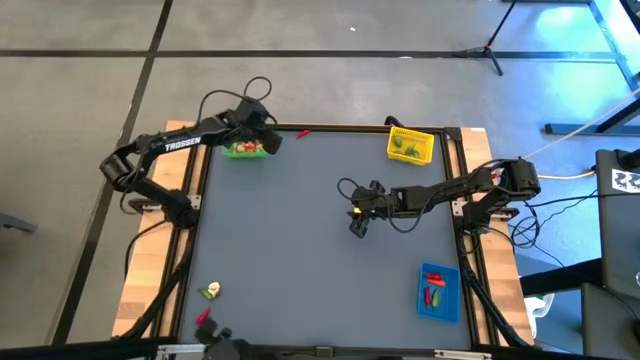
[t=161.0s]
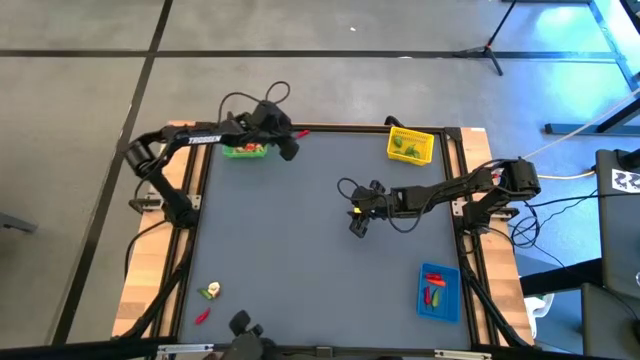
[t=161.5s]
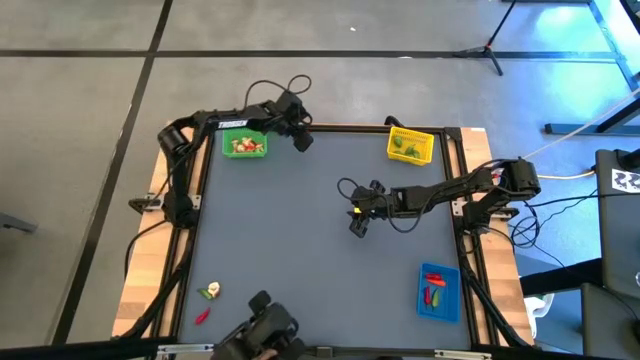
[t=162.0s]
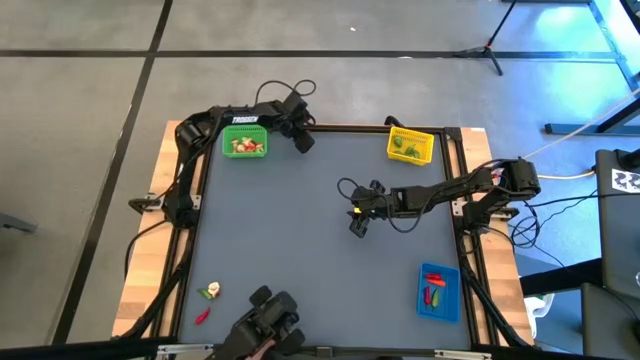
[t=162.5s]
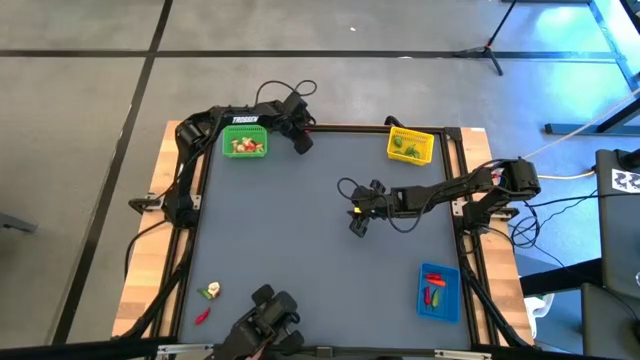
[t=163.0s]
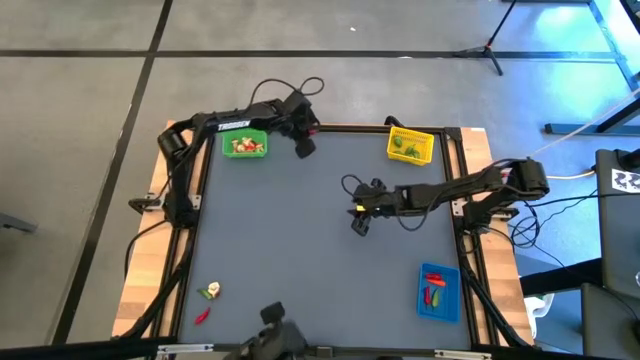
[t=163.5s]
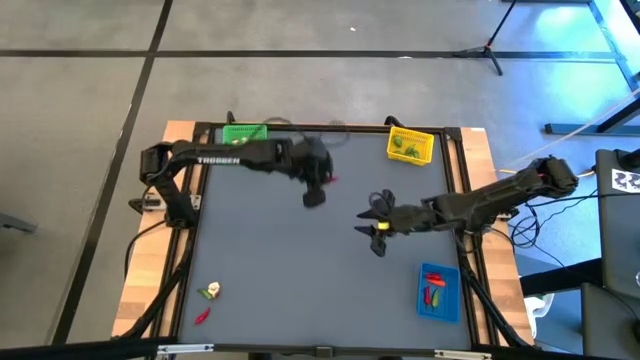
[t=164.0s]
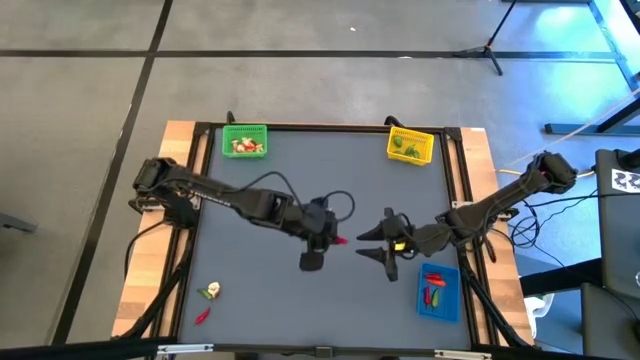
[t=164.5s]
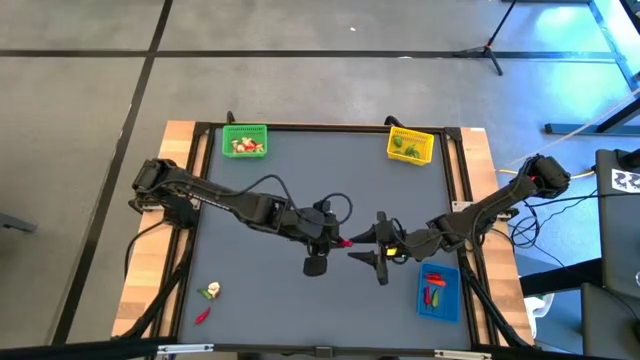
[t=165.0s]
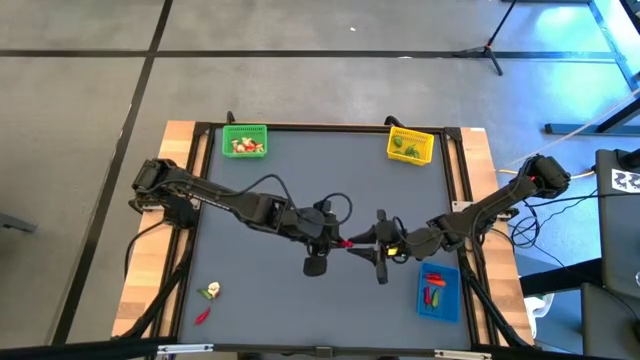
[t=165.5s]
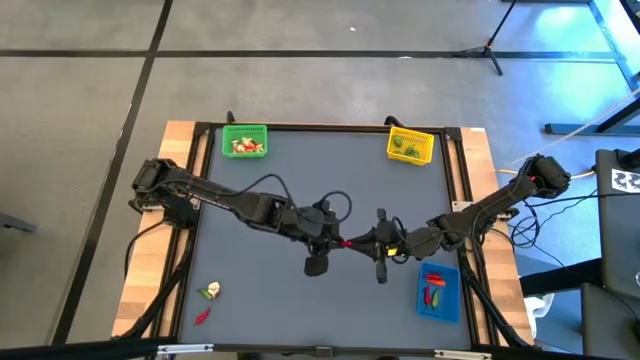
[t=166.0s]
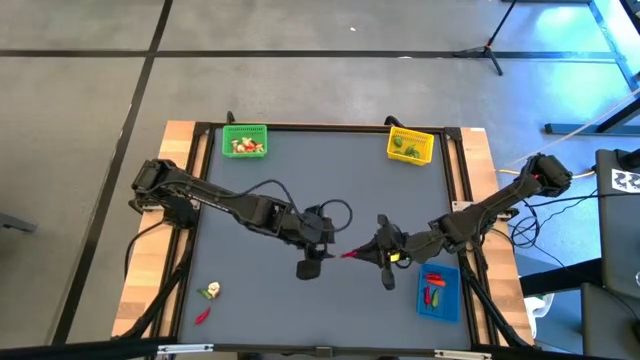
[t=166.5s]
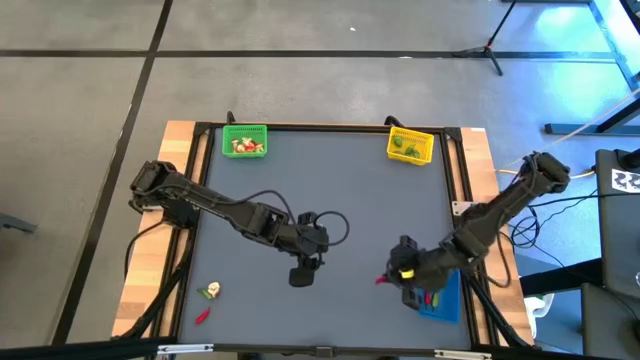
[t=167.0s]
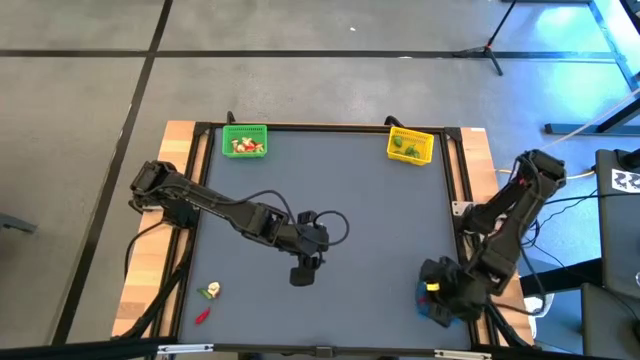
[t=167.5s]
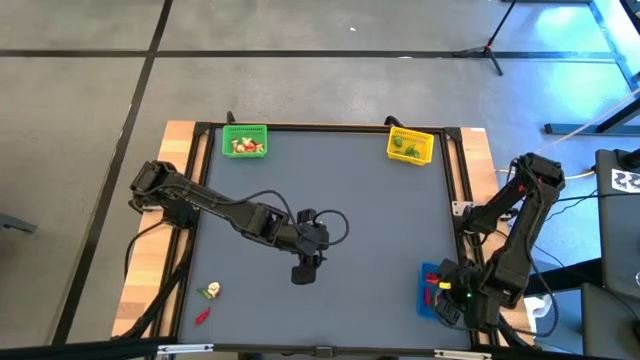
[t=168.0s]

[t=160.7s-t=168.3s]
Task: Sort produce into baskets
Put the red chili pepper into blue bin

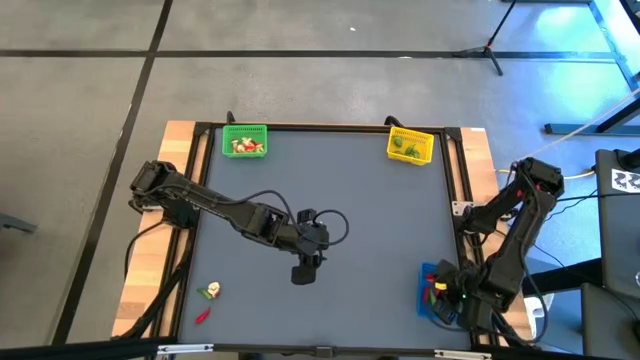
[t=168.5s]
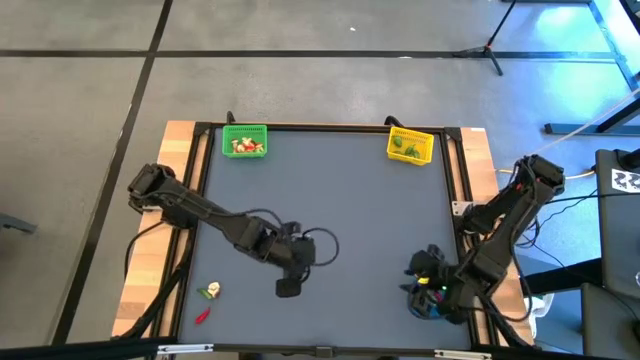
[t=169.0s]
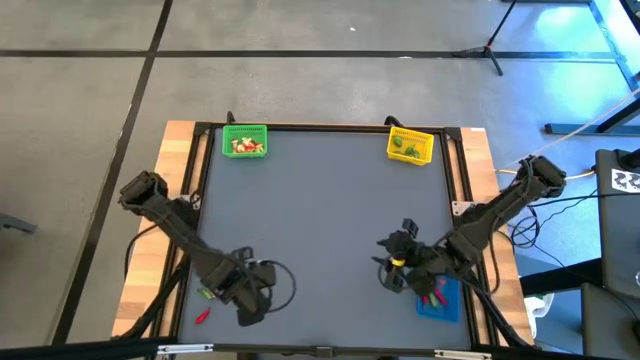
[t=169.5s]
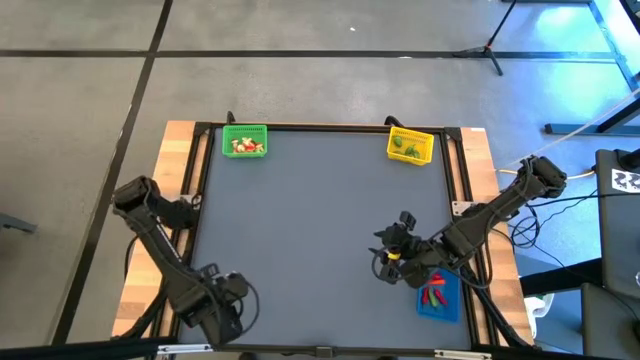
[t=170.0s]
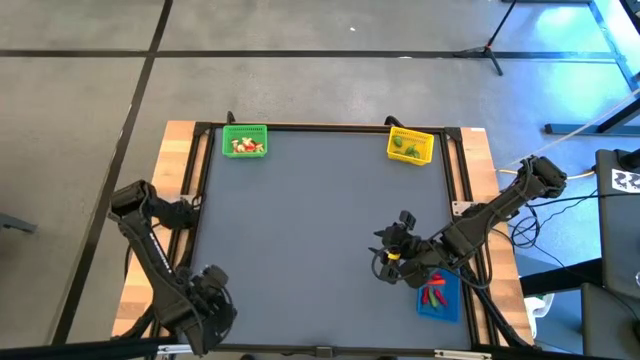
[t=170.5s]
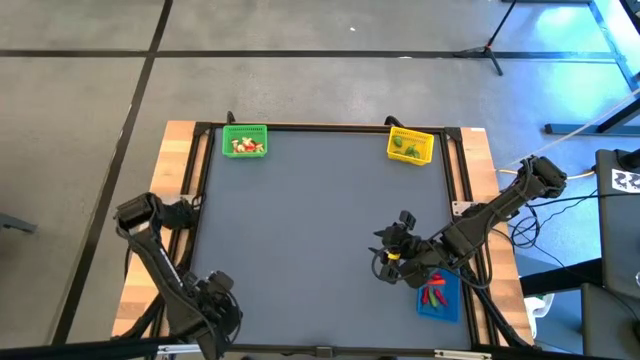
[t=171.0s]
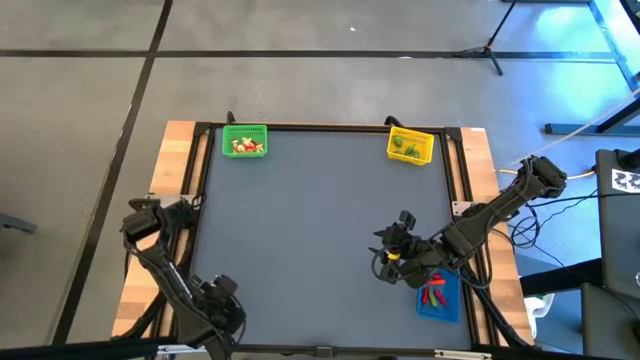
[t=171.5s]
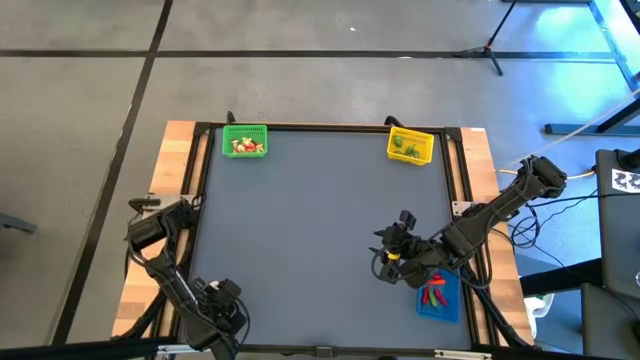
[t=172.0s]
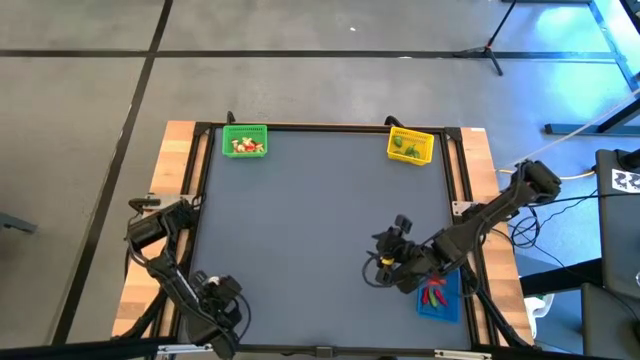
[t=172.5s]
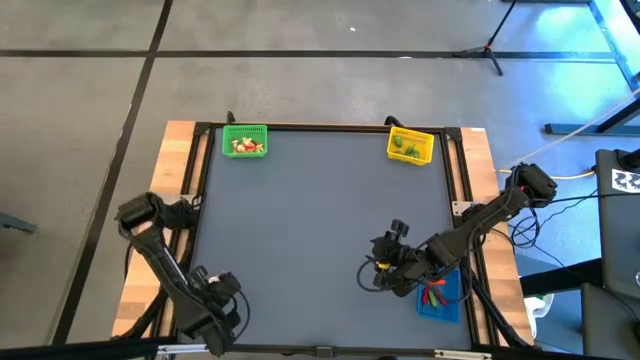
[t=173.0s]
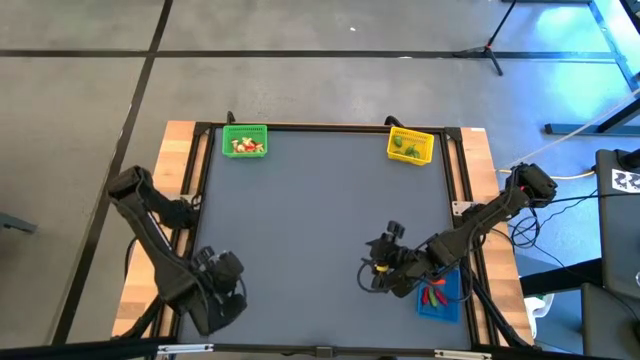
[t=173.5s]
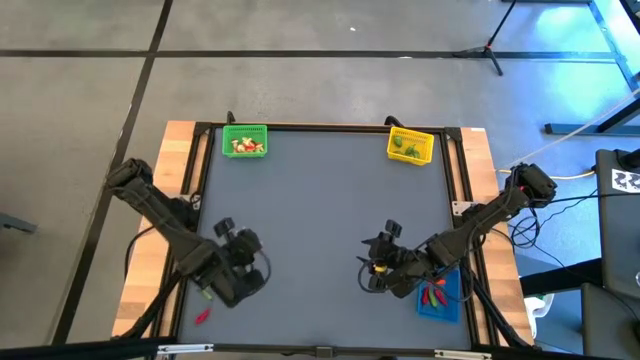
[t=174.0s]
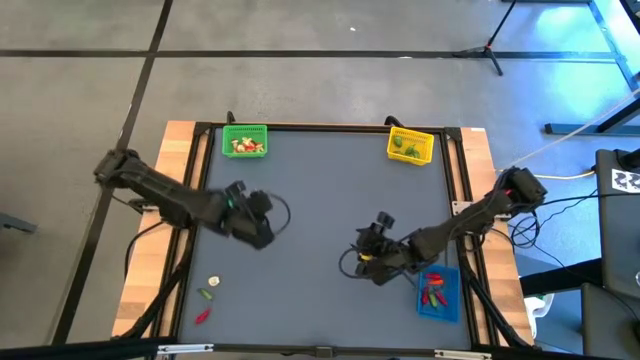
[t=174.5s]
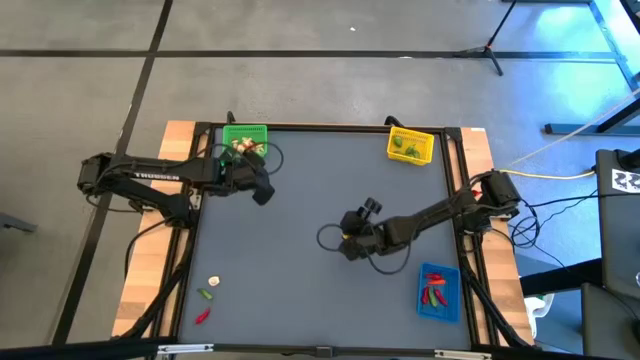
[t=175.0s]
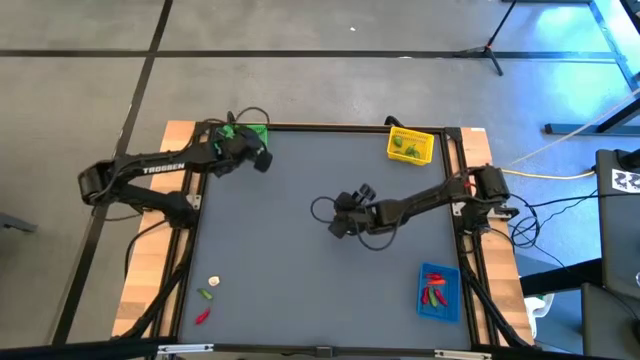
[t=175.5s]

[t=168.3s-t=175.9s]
Put the brown mushroom into the green bin

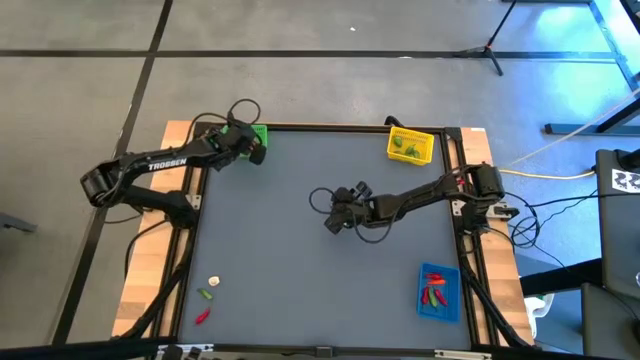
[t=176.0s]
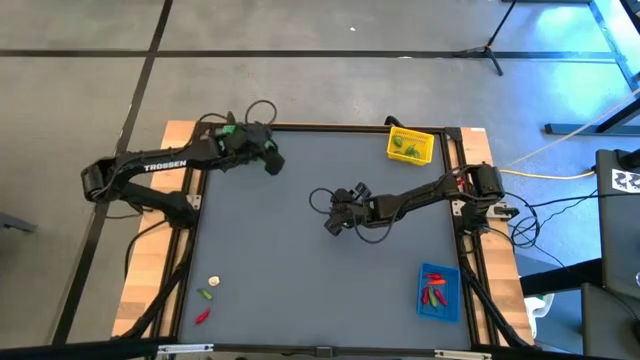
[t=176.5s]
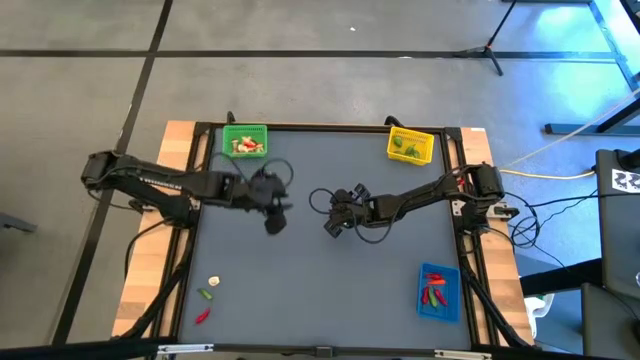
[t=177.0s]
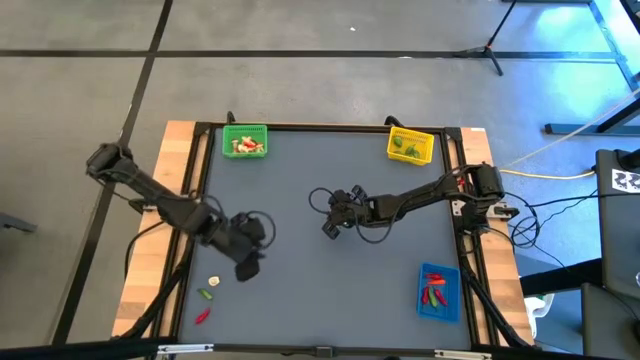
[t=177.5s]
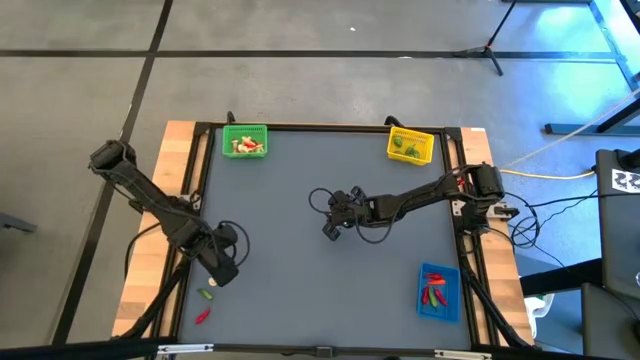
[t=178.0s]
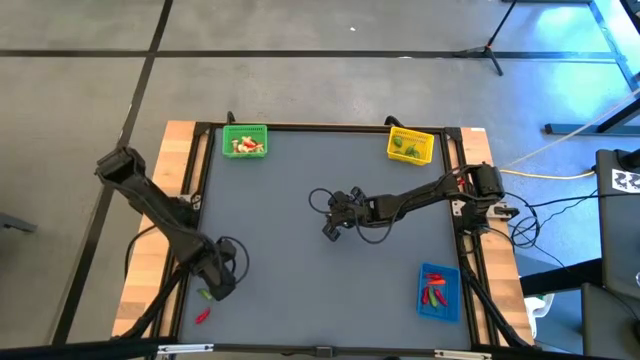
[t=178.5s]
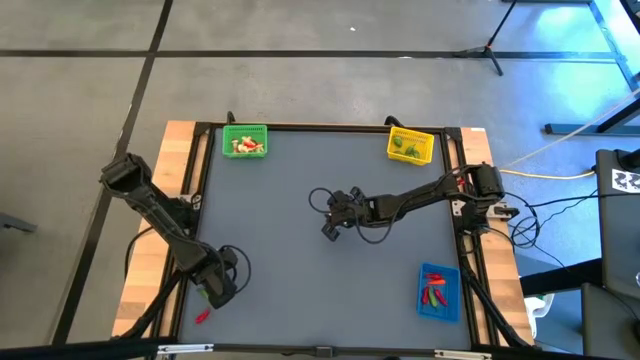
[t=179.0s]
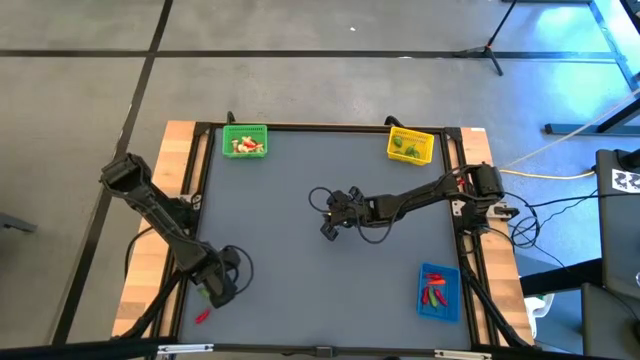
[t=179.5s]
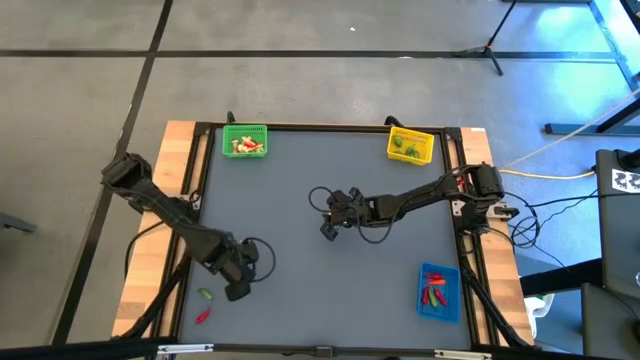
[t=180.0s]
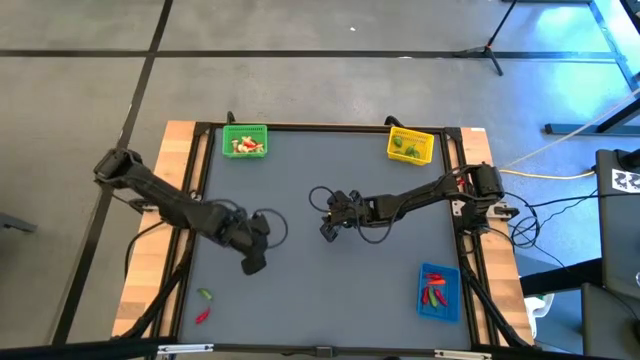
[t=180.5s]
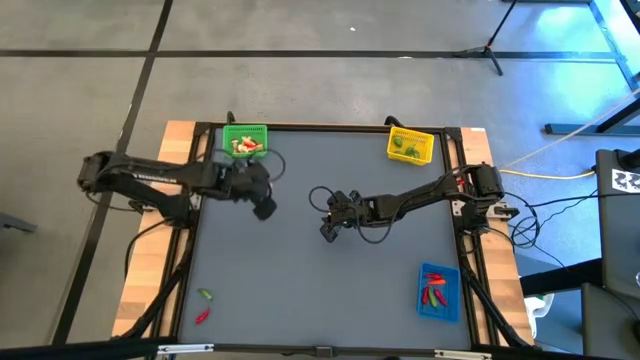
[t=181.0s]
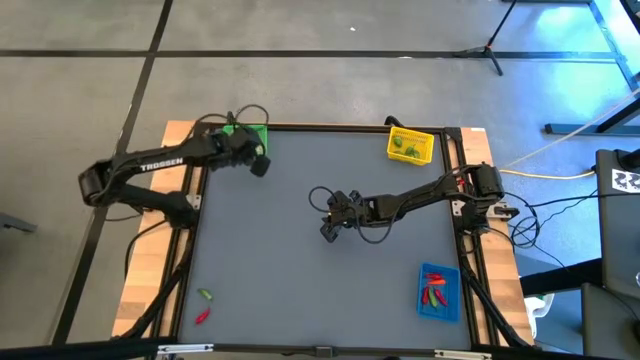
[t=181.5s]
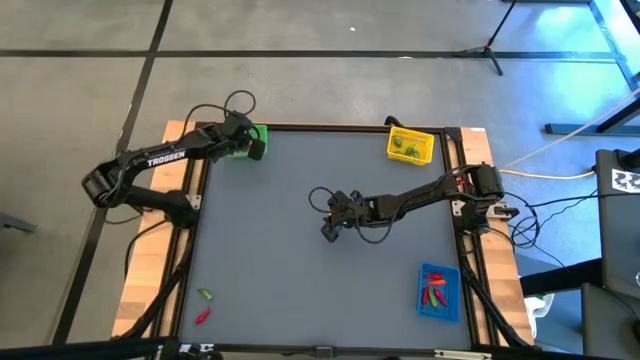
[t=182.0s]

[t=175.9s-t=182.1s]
Put the red mushroom into the green bin
